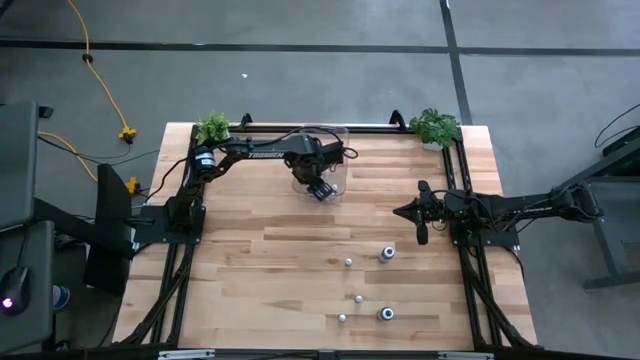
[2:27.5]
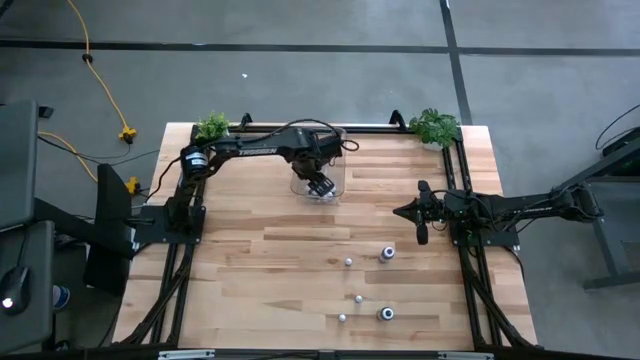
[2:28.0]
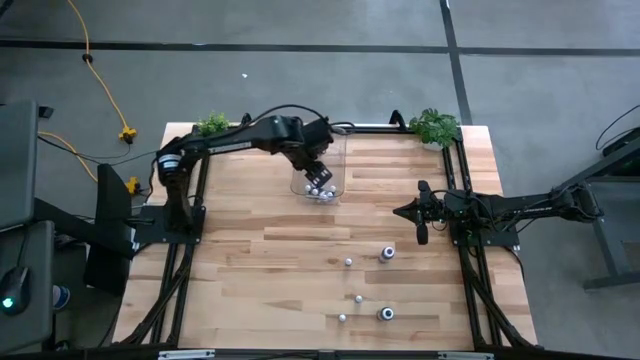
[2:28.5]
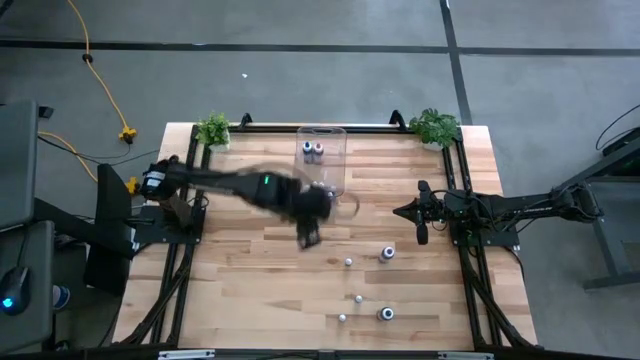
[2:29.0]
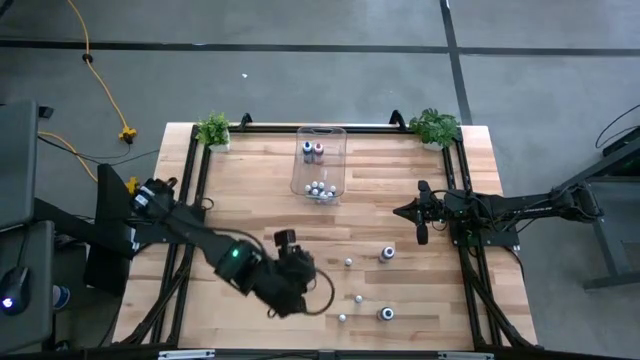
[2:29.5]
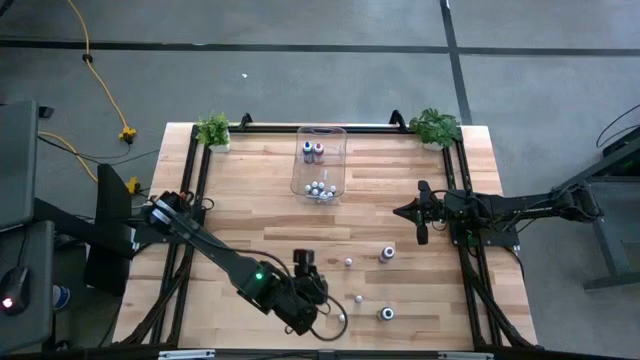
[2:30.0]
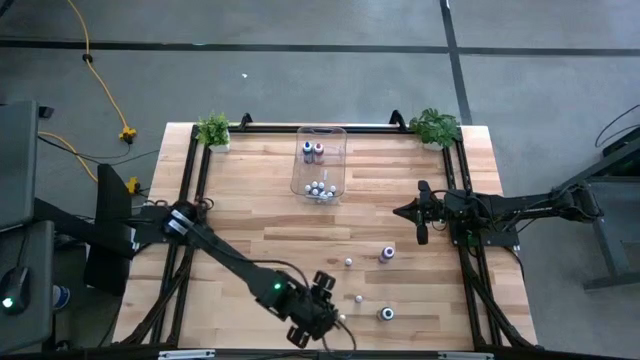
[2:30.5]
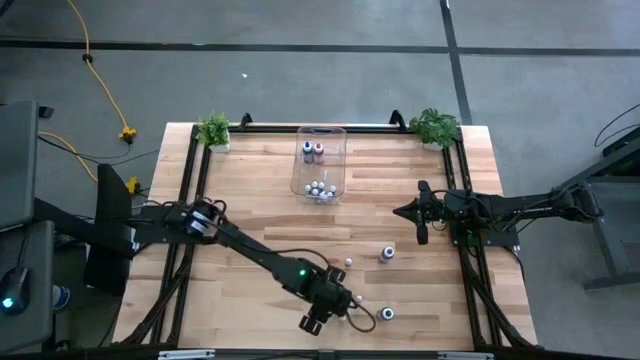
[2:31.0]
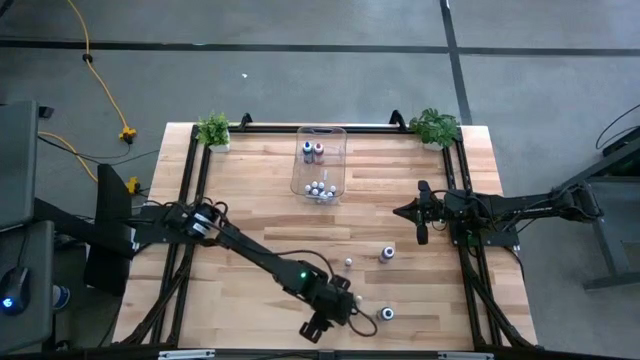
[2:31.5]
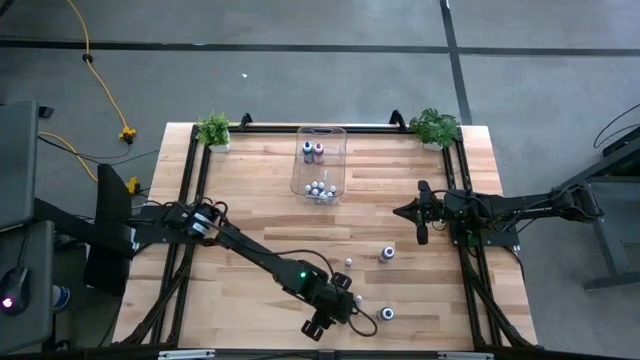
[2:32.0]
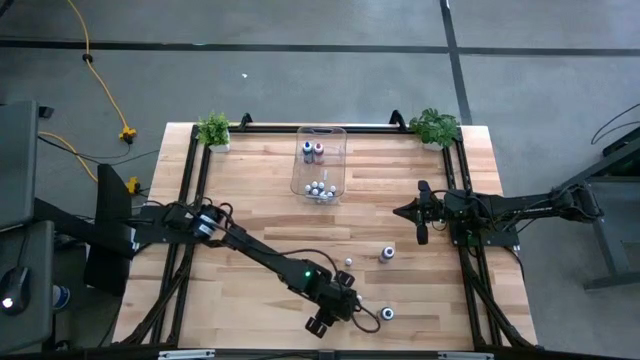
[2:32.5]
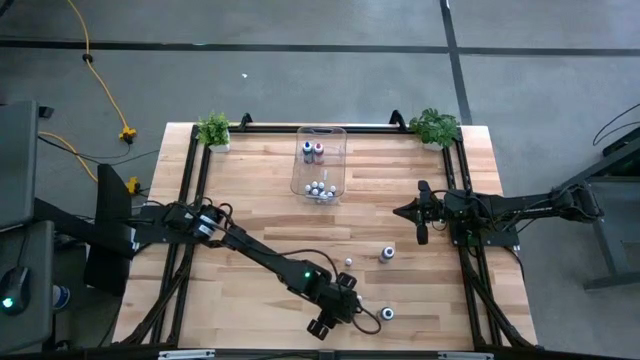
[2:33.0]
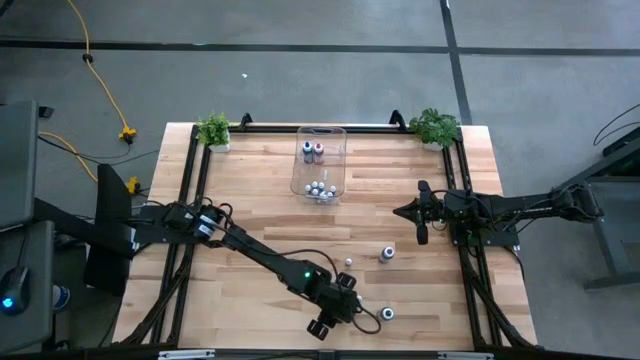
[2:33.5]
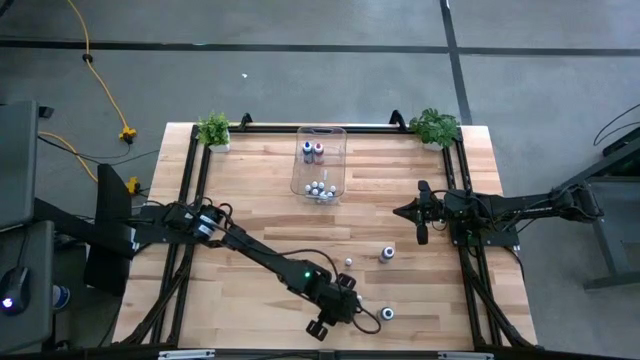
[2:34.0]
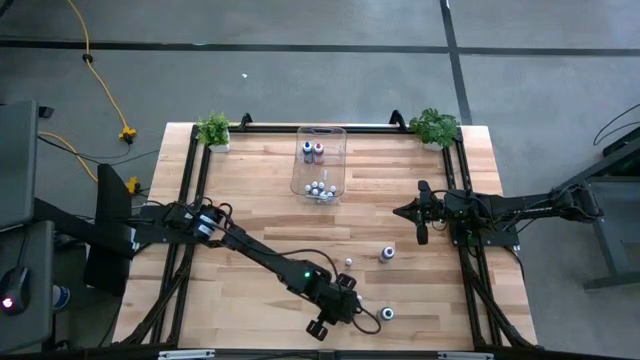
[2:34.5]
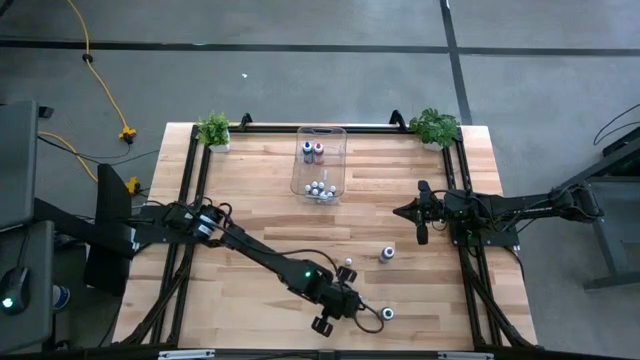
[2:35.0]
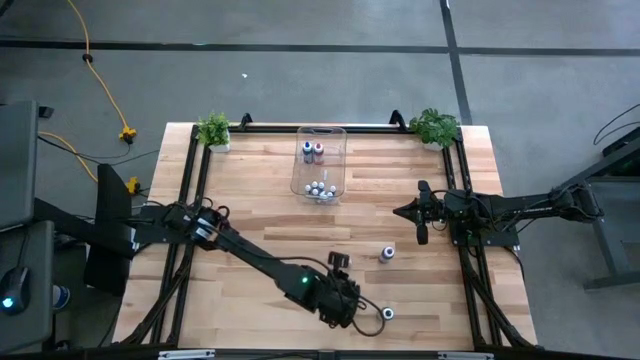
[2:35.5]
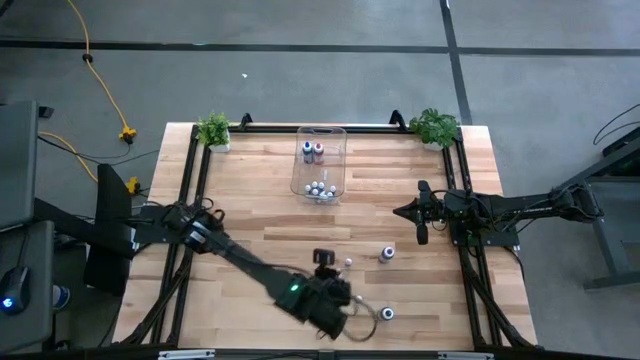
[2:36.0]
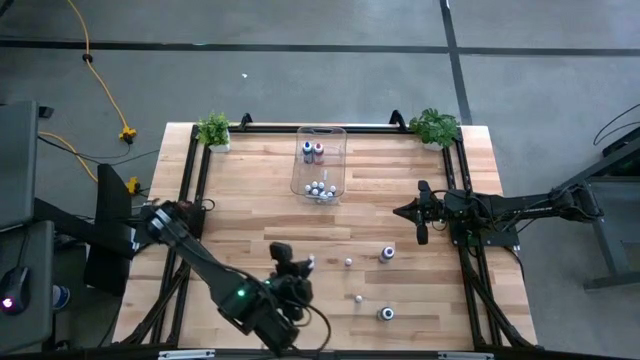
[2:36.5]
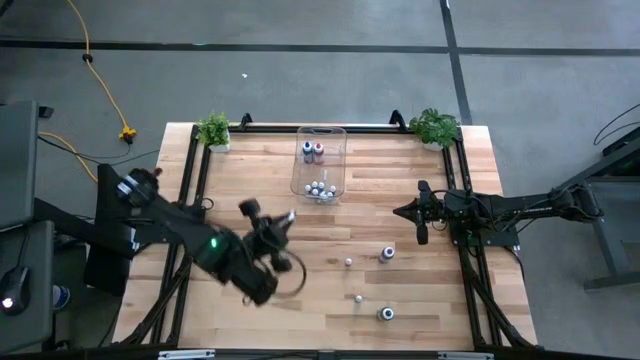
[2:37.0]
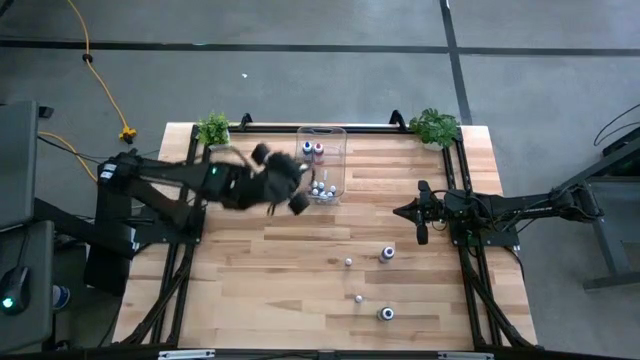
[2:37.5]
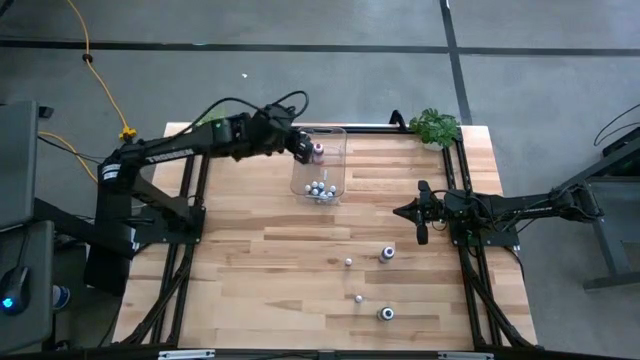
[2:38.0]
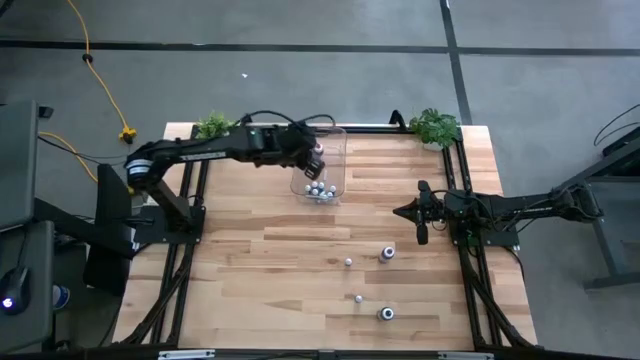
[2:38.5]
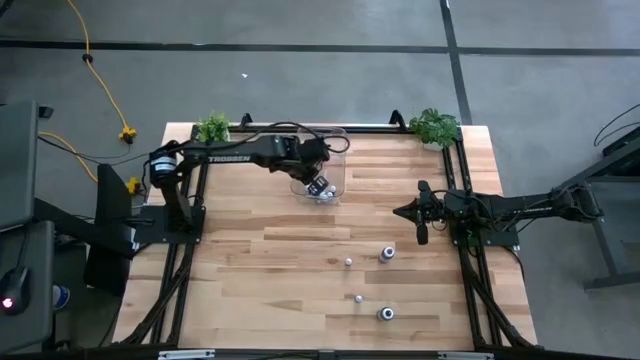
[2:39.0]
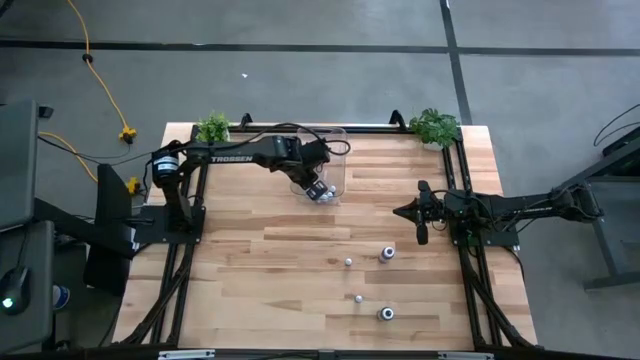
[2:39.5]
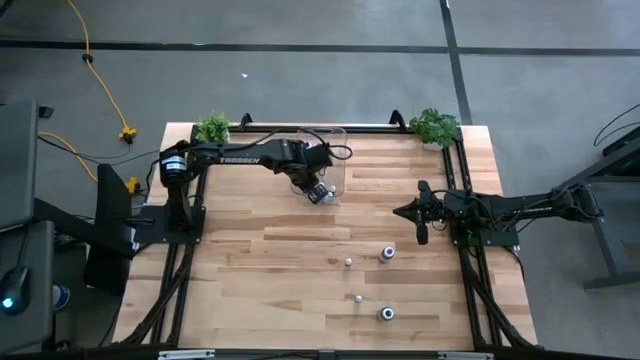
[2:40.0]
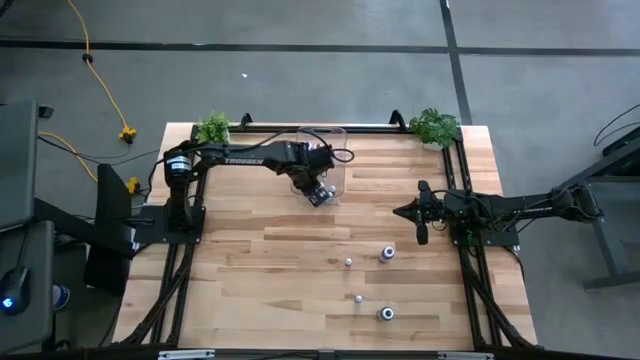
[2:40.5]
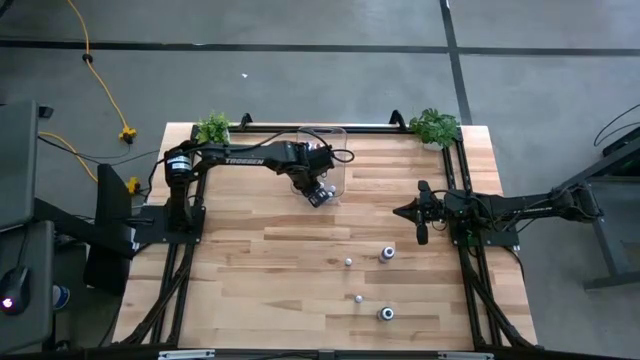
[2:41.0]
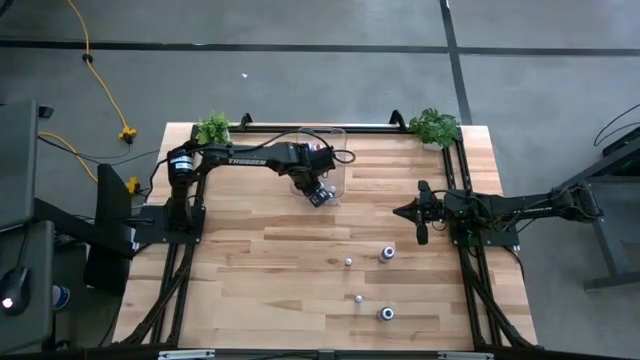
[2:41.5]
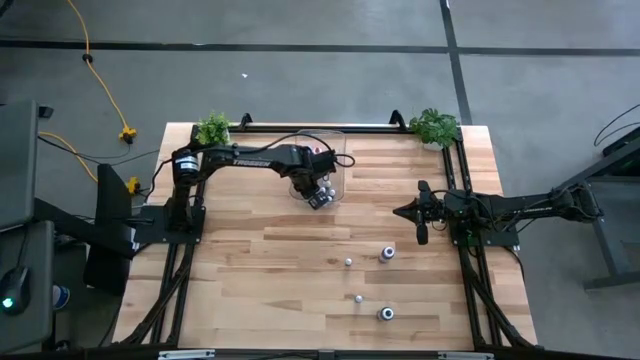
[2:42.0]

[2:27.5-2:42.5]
Task: Pick & Place food coloring
Put the small purple food coloring into the transparent bin

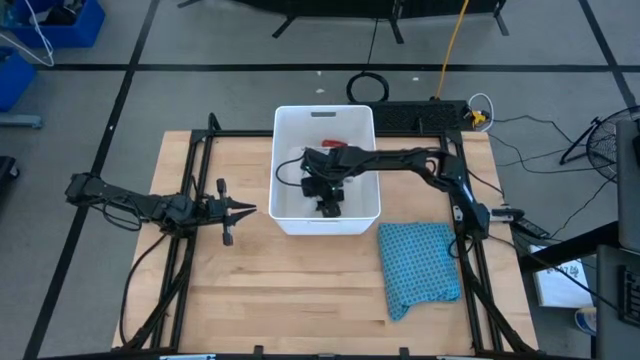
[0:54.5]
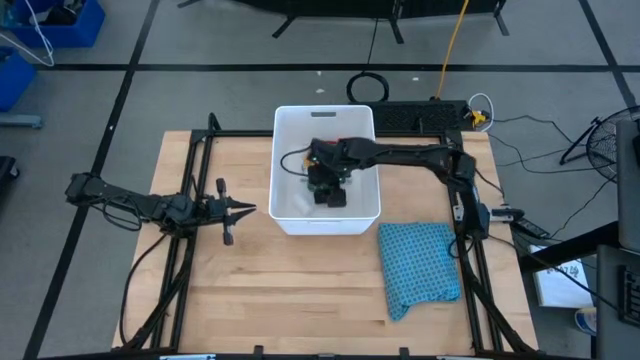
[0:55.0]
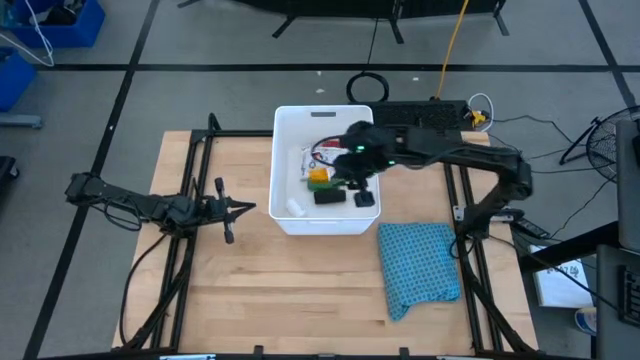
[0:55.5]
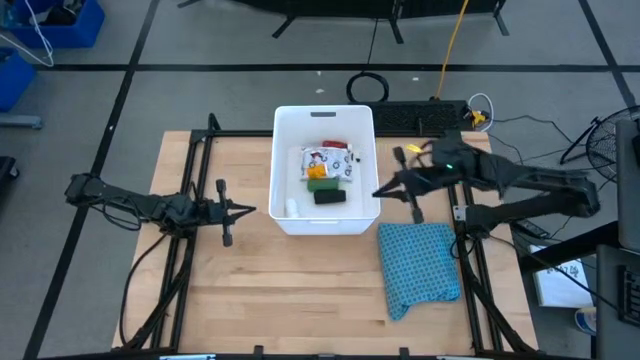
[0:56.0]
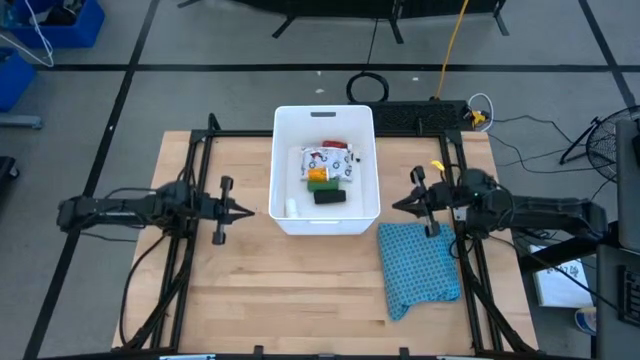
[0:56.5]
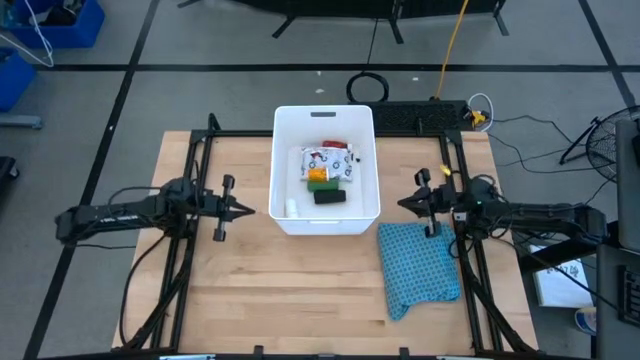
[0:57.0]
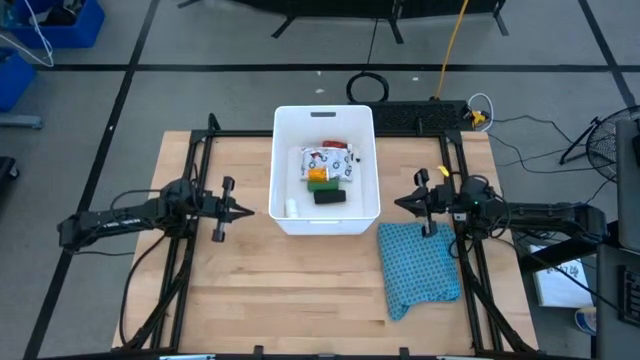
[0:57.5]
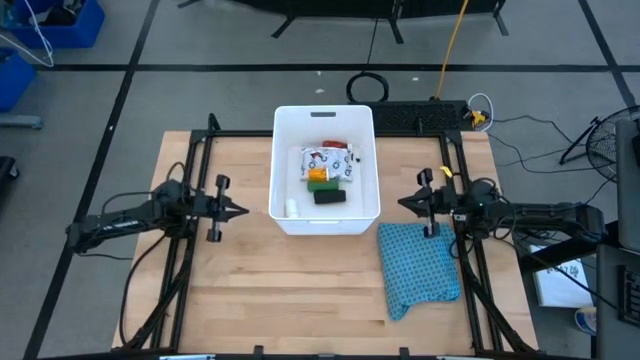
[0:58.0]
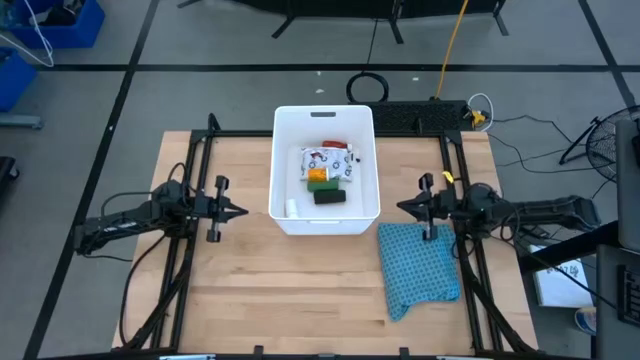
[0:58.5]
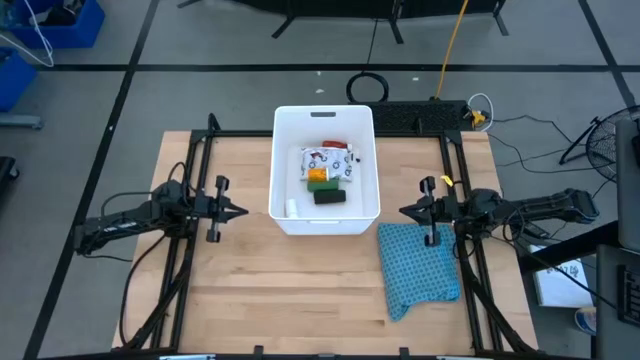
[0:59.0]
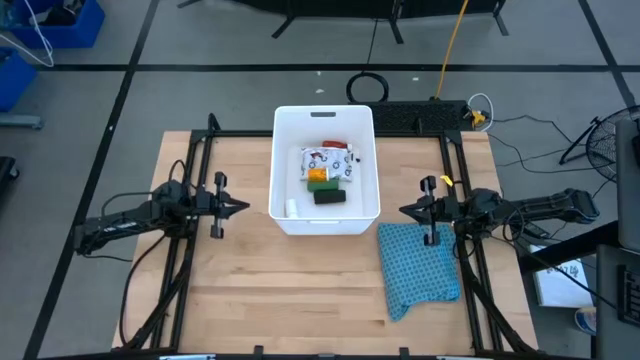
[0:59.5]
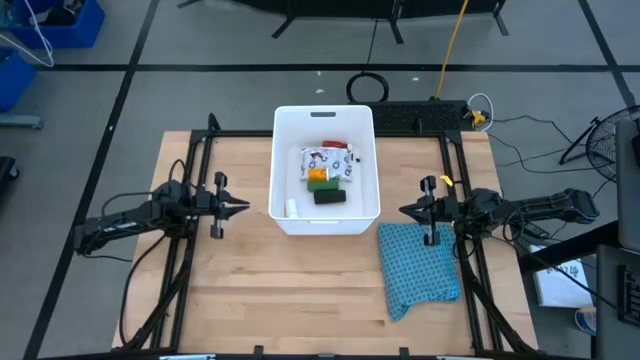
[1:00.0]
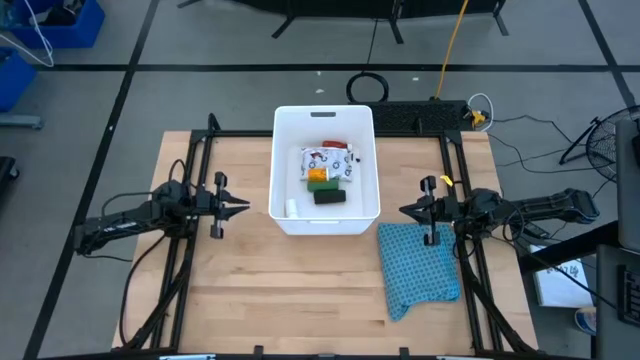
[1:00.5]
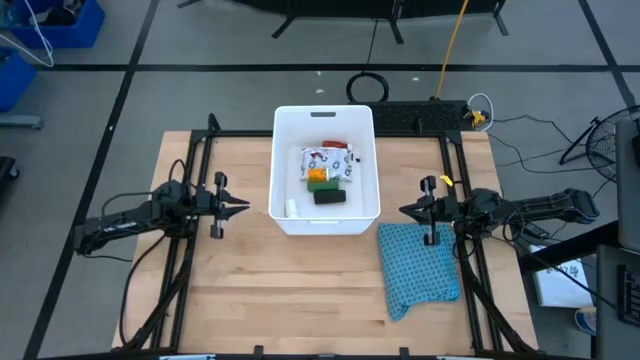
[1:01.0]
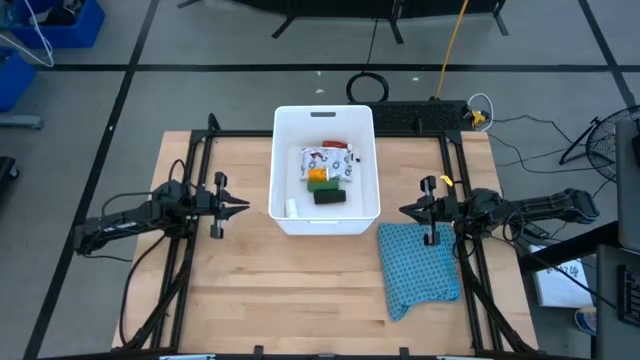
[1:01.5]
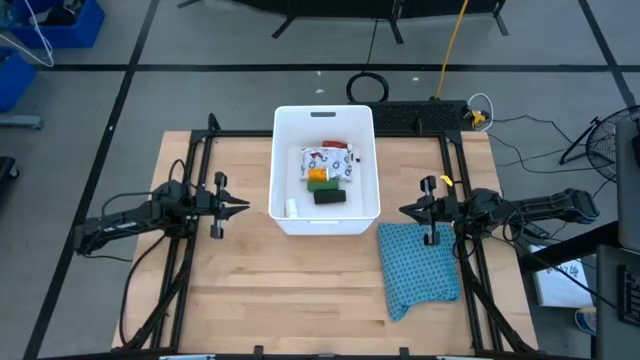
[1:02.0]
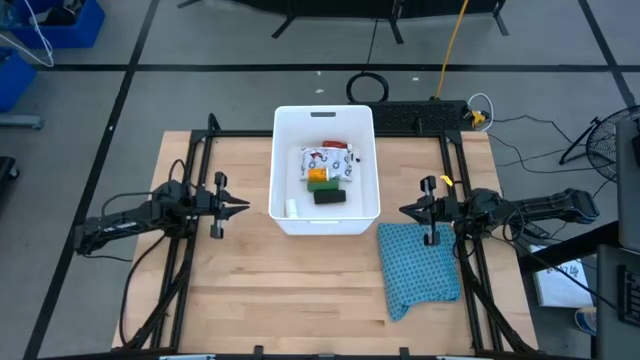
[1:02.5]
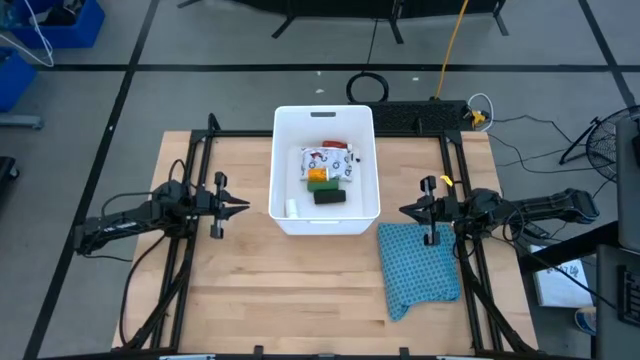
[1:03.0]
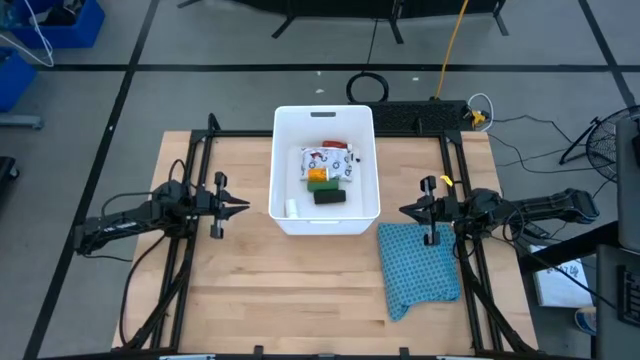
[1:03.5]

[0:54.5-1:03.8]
Task: Pick & place medical supplies in basket/bin
Return to Home Position
